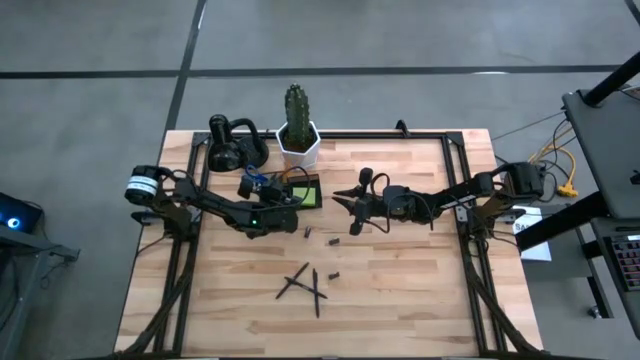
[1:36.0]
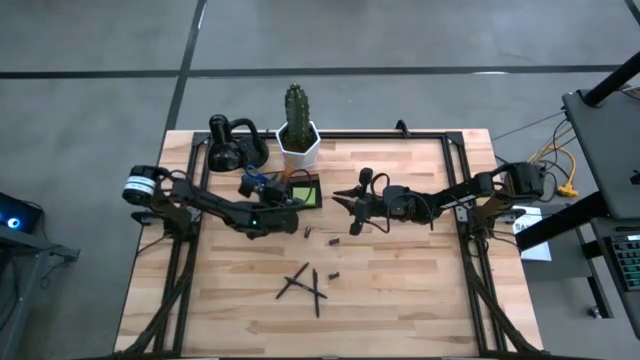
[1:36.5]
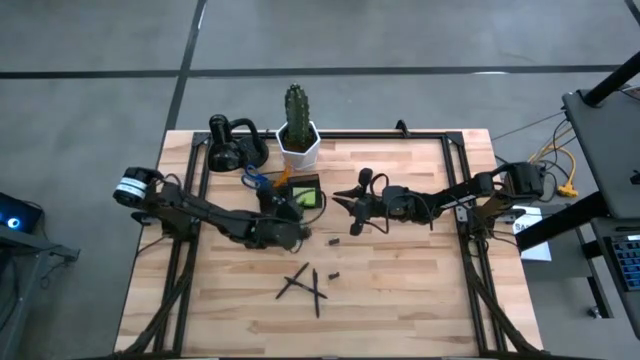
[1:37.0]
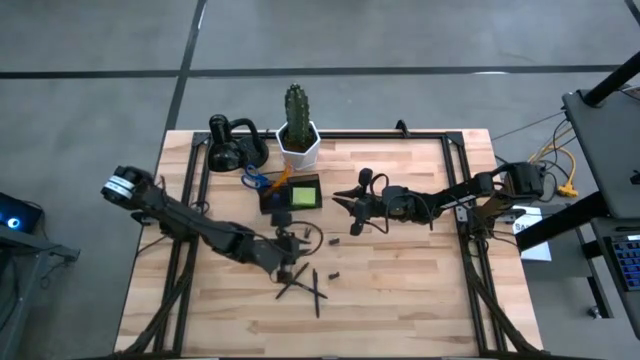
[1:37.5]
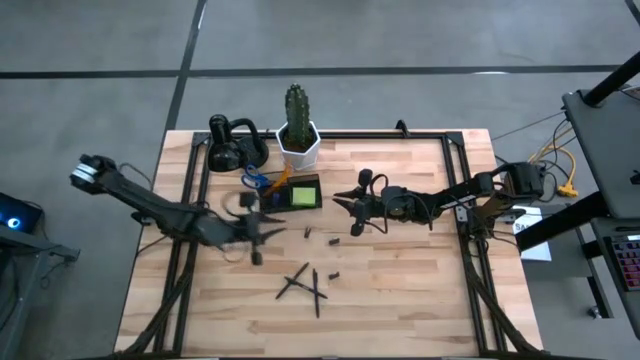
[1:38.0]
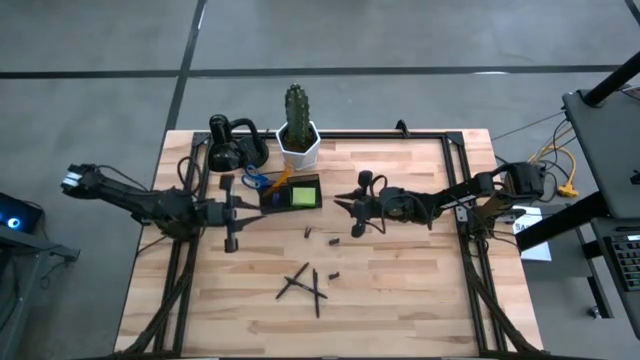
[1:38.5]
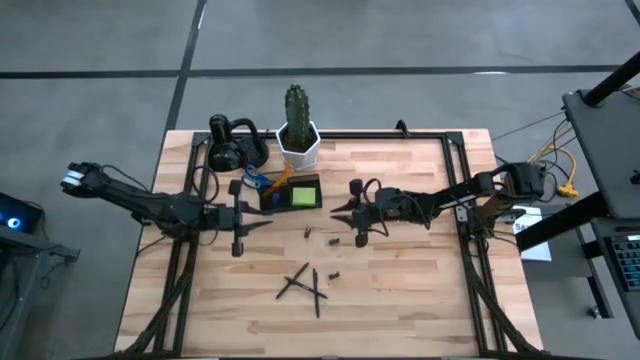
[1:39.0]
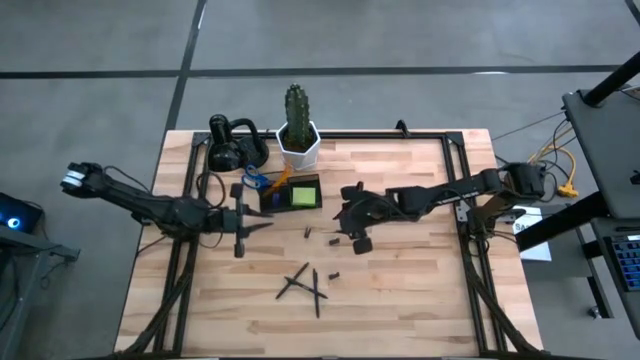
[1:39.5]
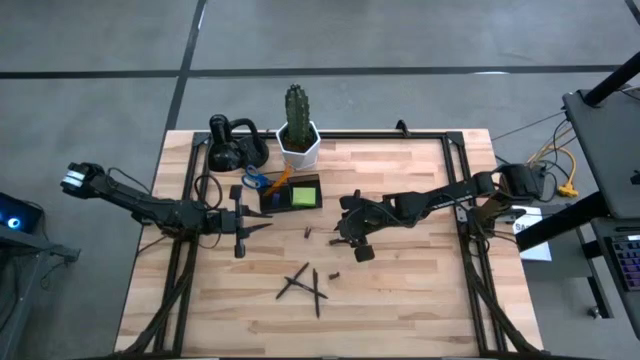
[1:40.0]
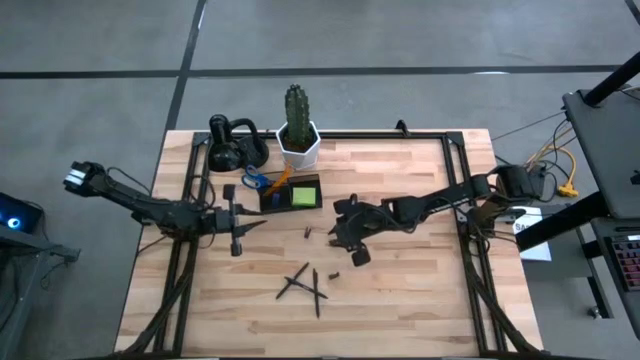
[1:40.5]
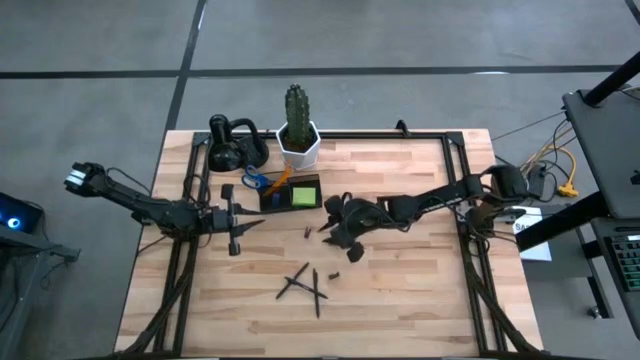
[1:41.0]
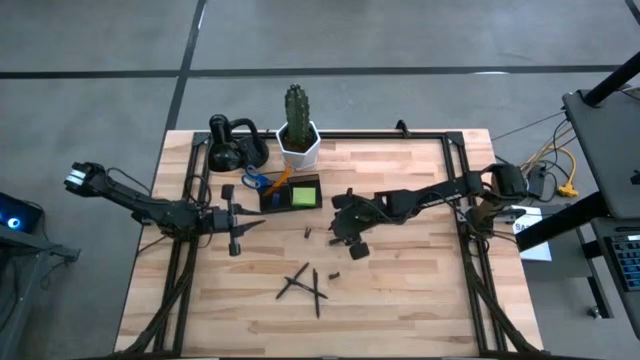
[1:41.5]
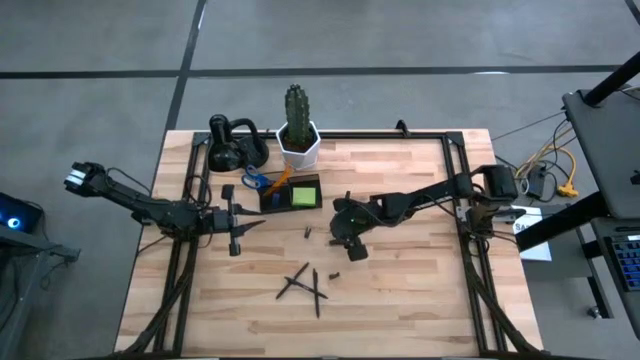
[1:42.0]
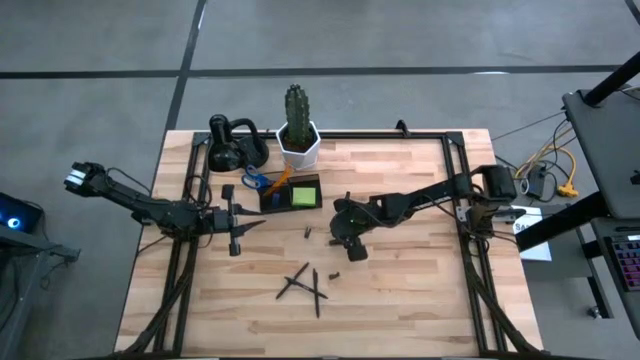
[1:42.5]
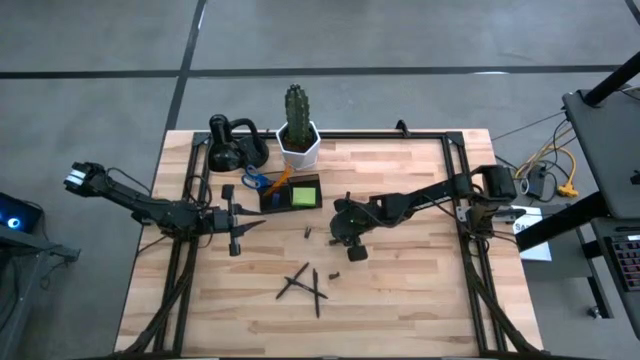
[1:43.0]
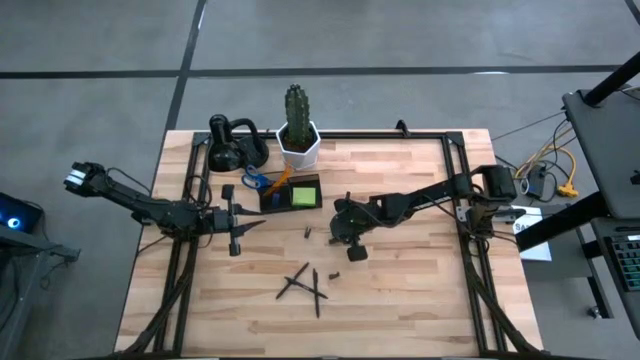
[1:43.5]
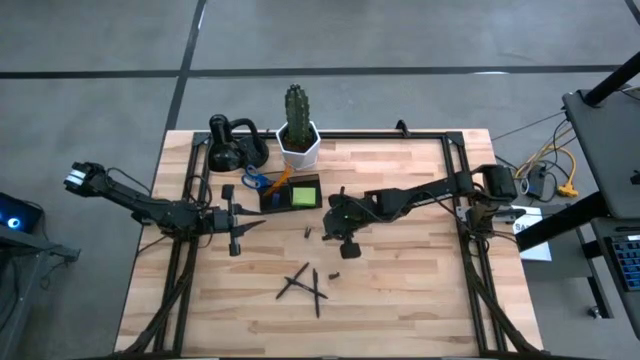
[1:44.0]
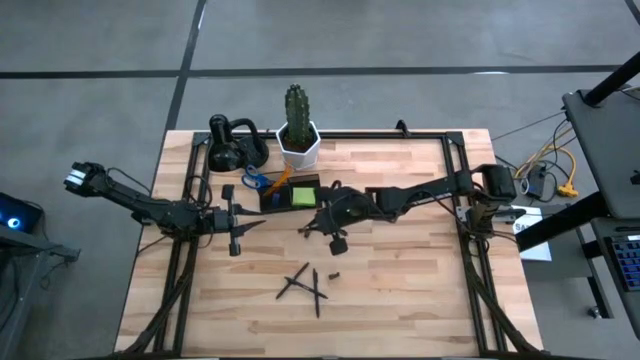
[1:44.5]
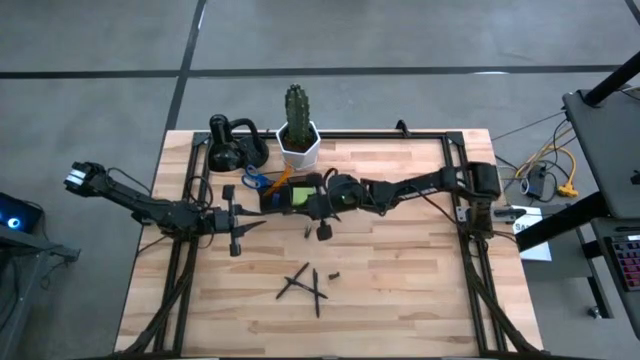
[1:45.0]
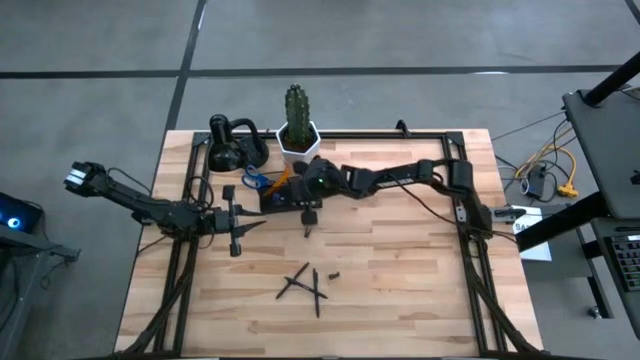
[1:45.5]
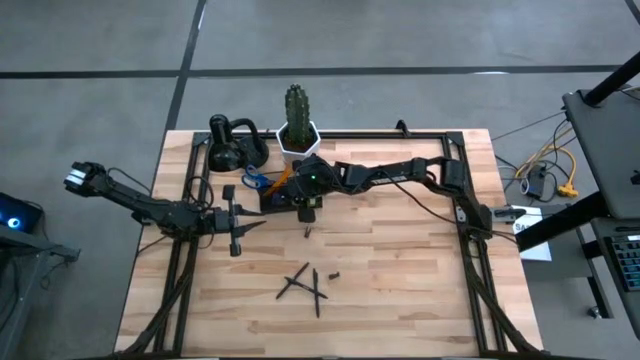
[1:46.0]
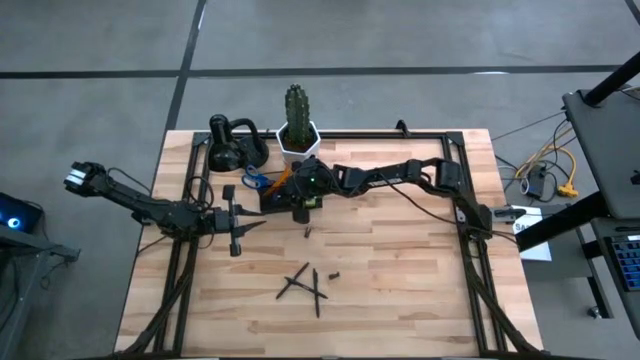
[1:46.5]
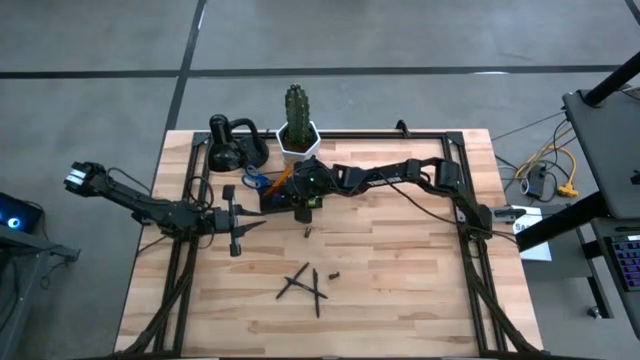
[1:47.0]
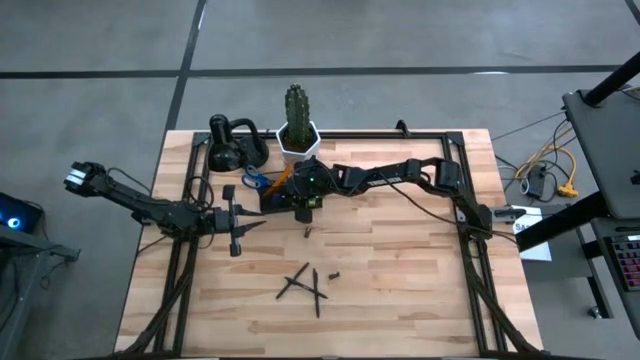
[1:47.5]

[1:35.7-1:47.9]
Task: Pick and place office supplies into organizer
Put the top right black binder clip into the black desk organizer

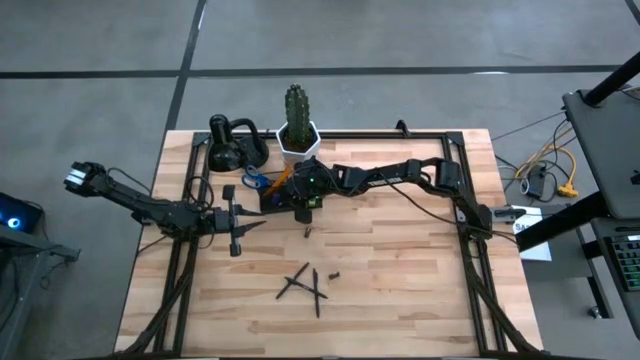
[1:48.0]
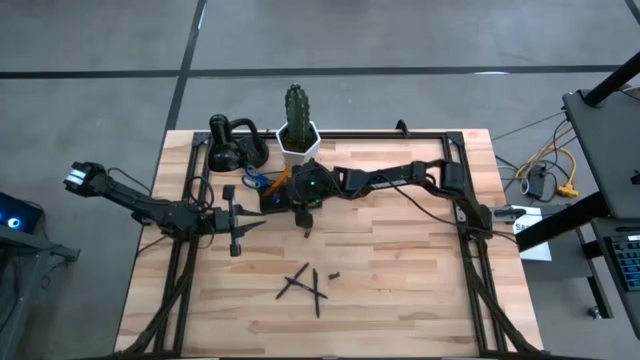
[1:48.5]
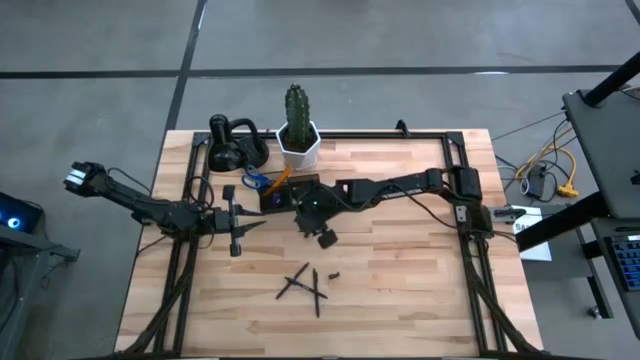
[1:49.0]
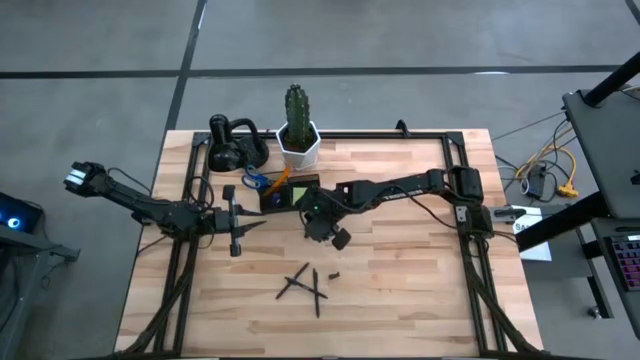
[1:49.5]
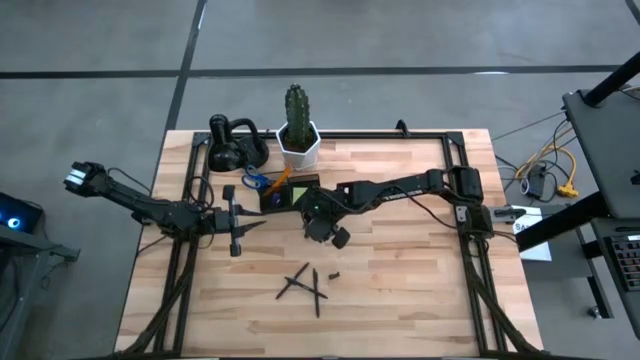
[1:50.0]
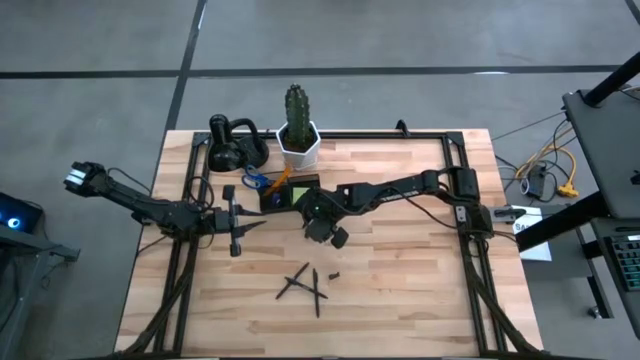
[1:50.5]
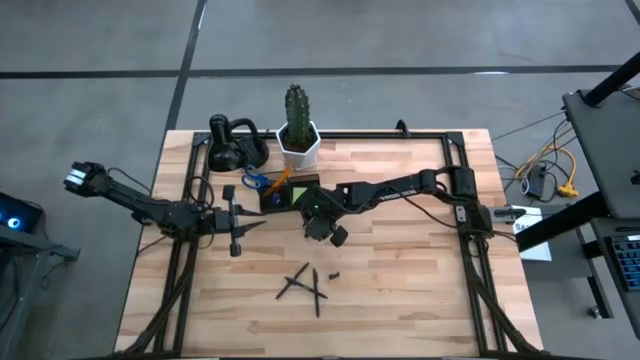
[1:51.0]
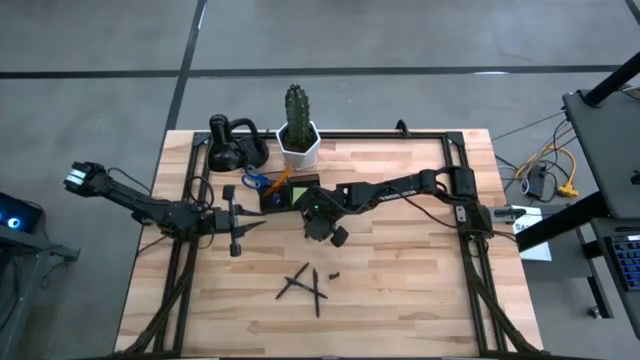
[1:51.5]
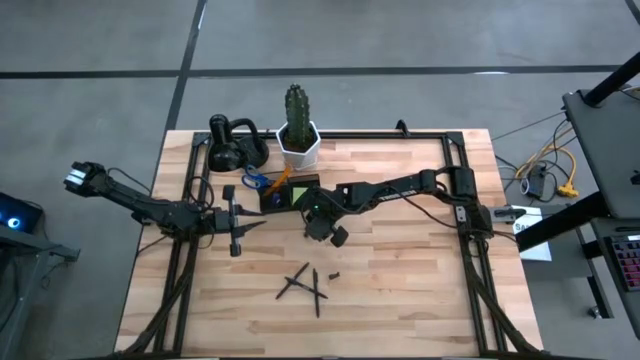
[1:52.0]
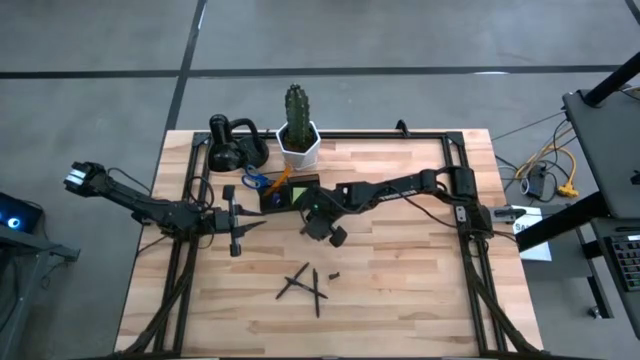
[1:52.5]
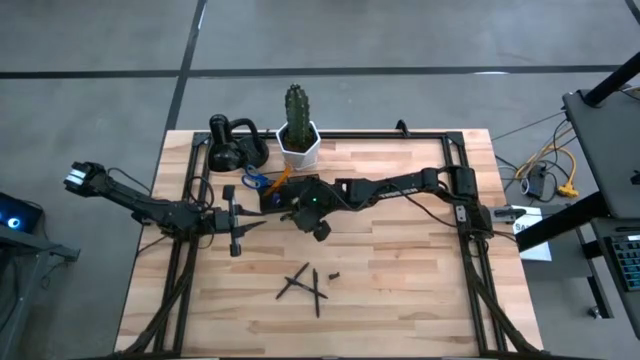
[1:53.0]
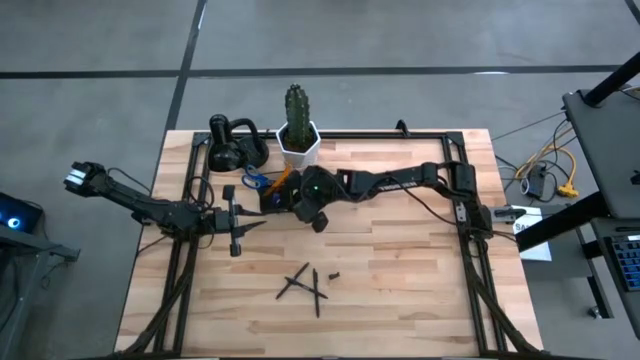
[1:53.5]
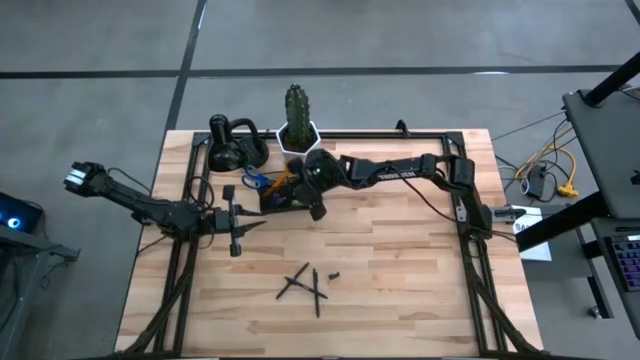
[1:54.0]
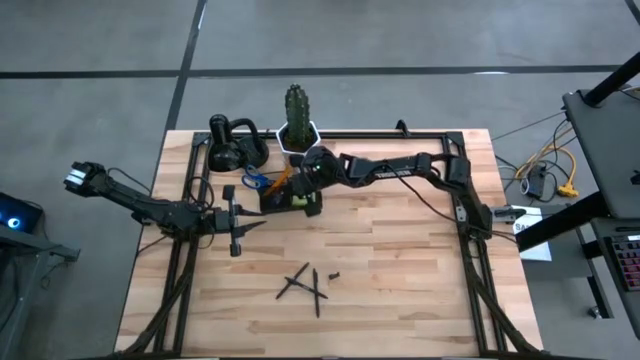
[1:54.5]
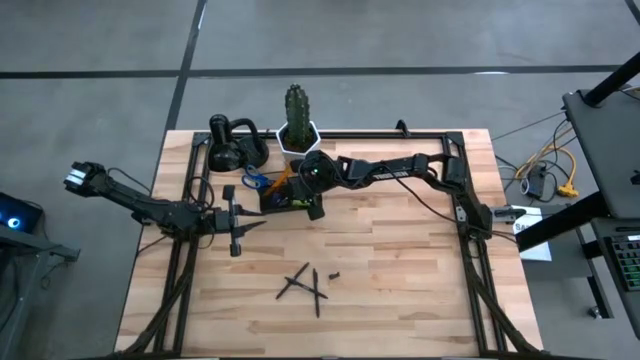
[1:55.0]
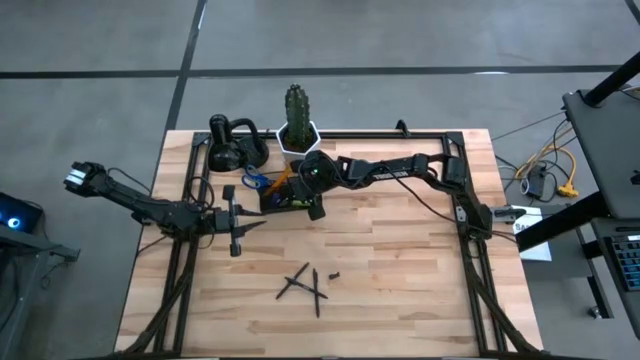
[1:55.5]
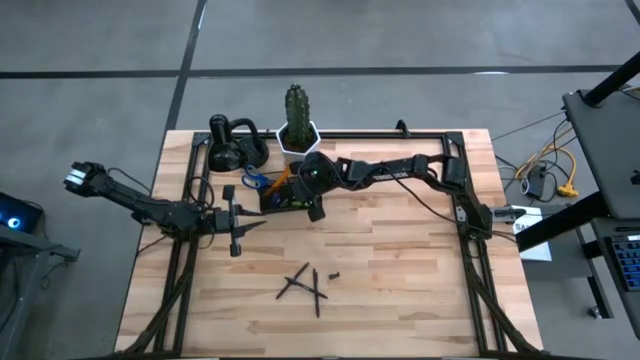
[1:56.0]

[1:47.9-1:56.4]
Put the top black binder clip into the black desk organizer
